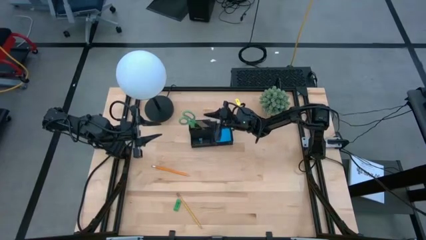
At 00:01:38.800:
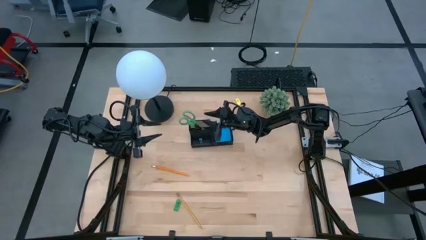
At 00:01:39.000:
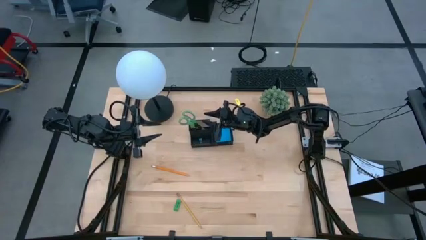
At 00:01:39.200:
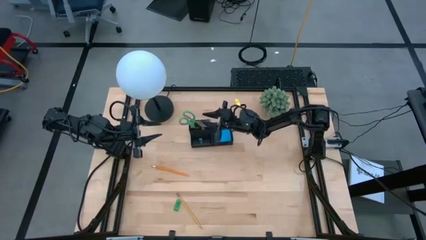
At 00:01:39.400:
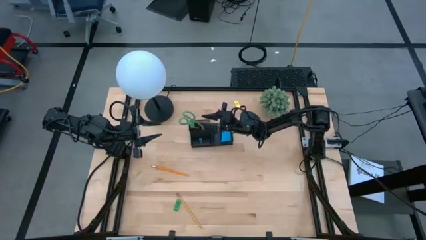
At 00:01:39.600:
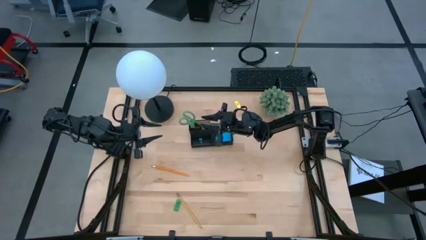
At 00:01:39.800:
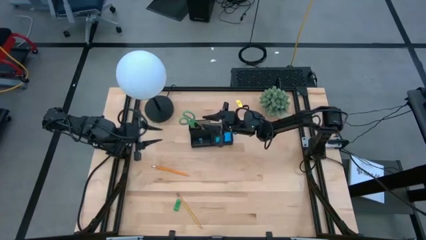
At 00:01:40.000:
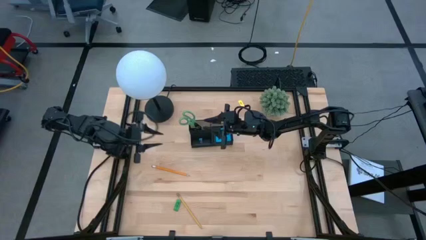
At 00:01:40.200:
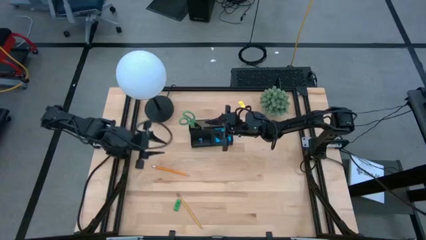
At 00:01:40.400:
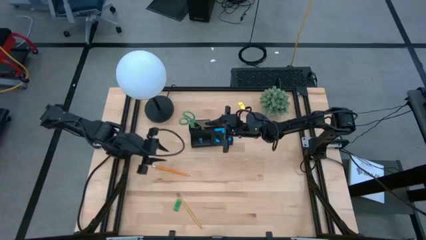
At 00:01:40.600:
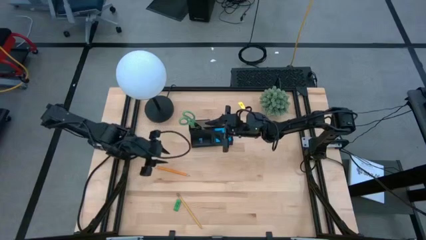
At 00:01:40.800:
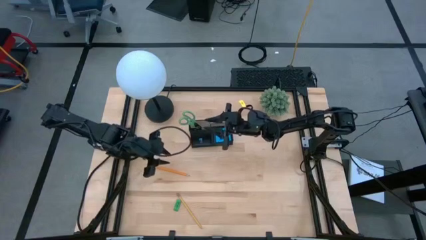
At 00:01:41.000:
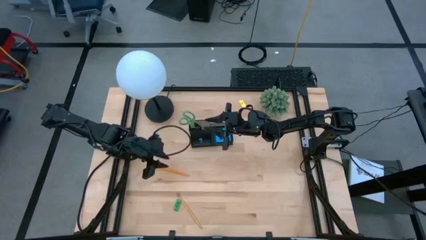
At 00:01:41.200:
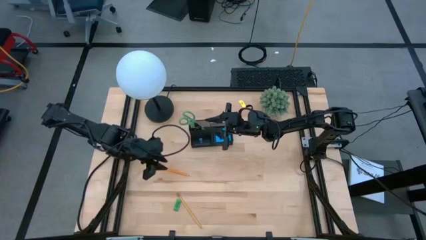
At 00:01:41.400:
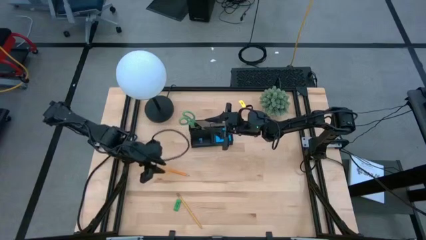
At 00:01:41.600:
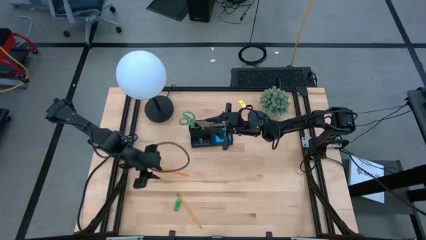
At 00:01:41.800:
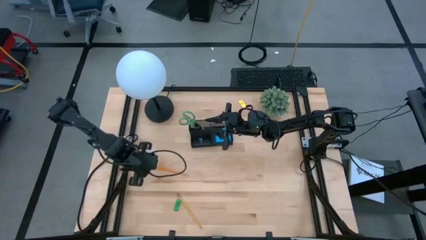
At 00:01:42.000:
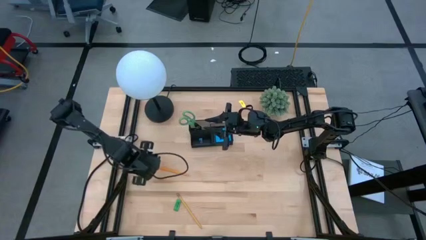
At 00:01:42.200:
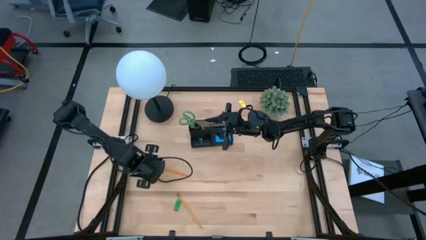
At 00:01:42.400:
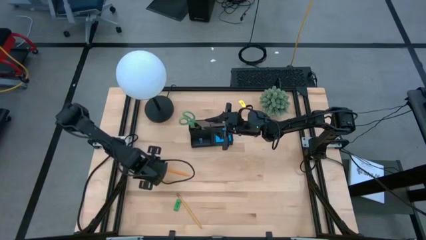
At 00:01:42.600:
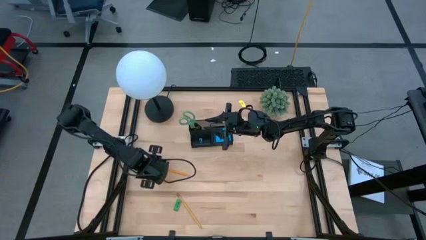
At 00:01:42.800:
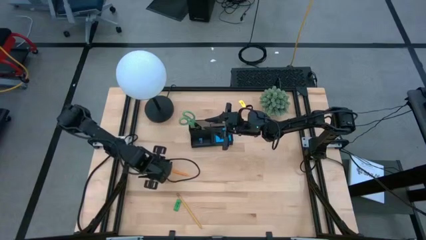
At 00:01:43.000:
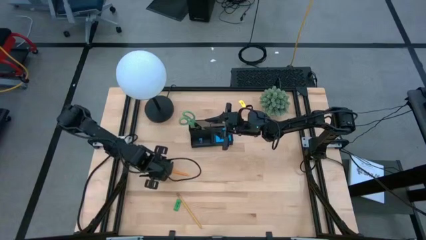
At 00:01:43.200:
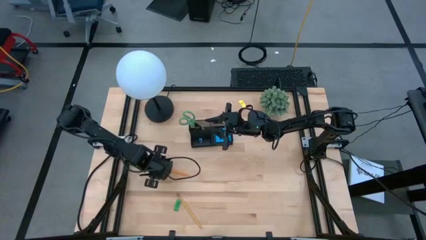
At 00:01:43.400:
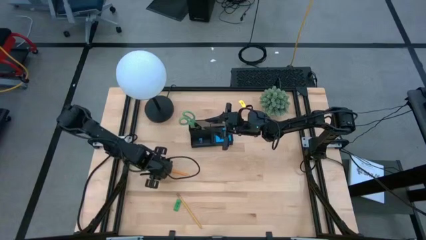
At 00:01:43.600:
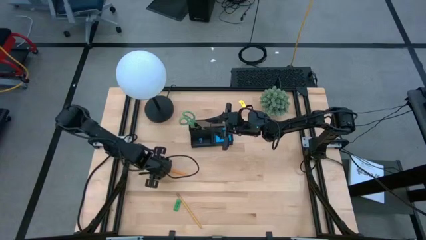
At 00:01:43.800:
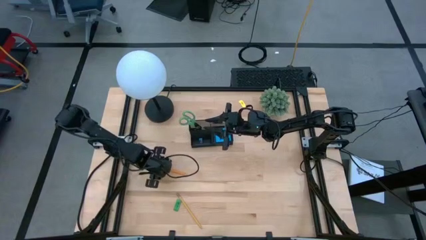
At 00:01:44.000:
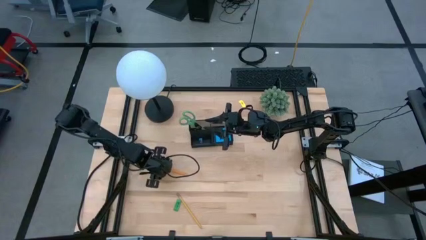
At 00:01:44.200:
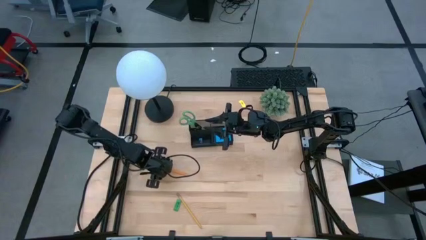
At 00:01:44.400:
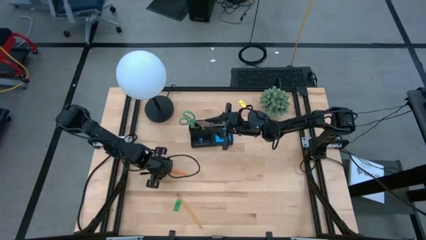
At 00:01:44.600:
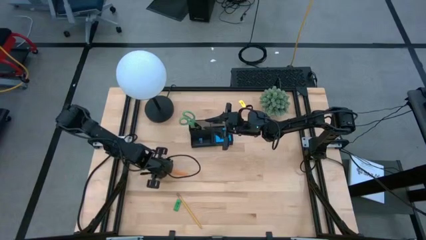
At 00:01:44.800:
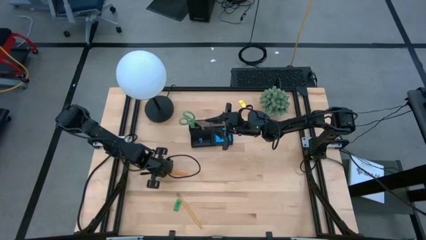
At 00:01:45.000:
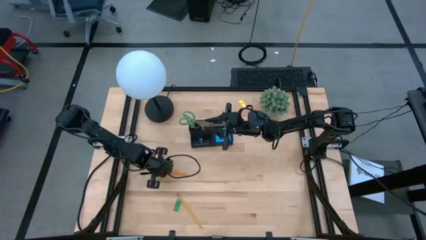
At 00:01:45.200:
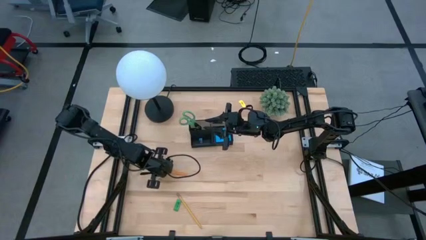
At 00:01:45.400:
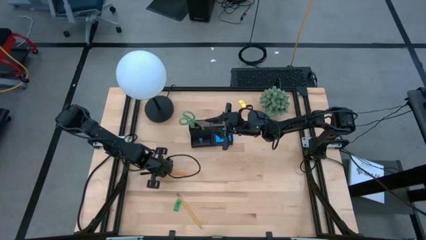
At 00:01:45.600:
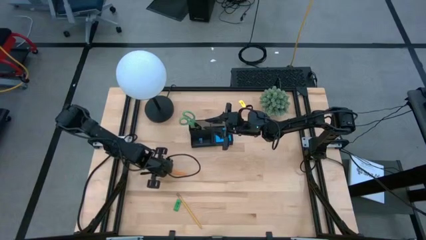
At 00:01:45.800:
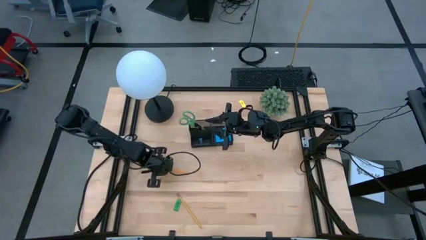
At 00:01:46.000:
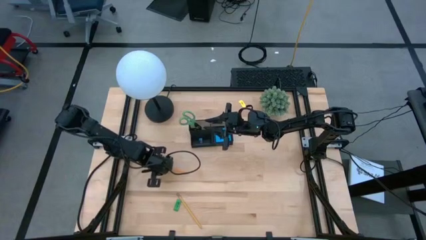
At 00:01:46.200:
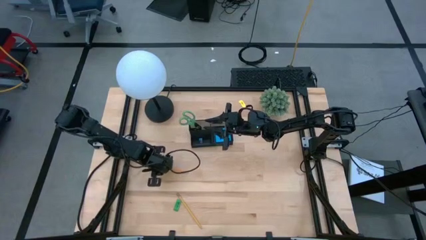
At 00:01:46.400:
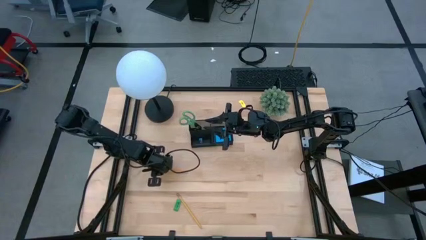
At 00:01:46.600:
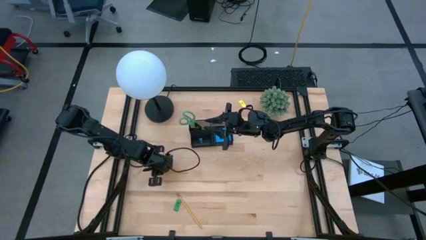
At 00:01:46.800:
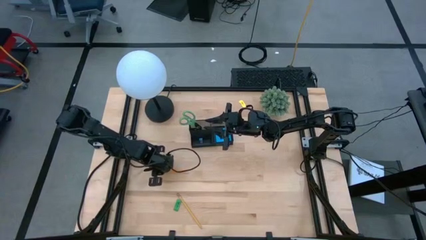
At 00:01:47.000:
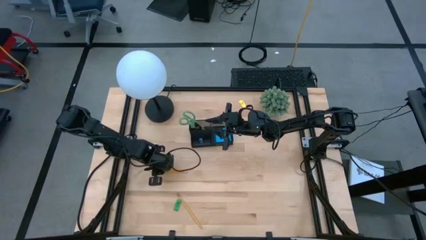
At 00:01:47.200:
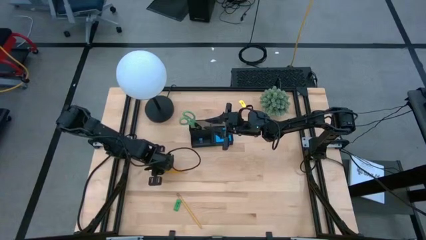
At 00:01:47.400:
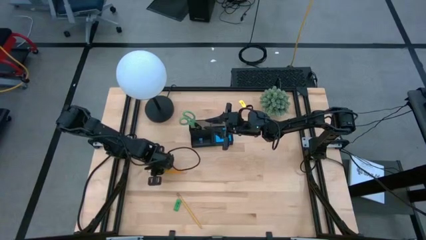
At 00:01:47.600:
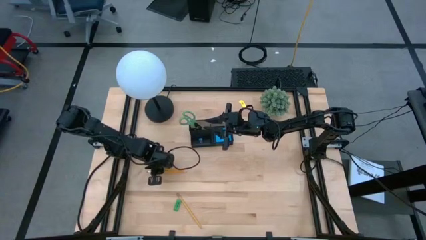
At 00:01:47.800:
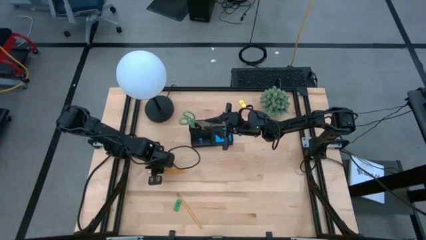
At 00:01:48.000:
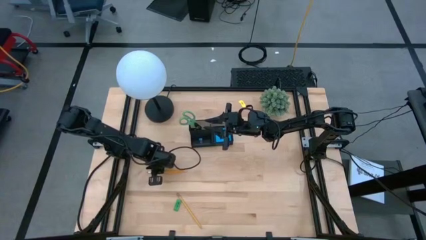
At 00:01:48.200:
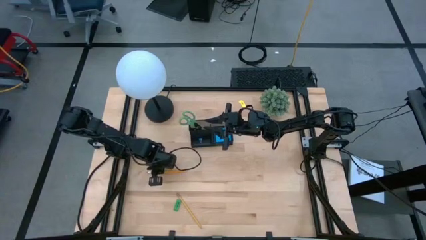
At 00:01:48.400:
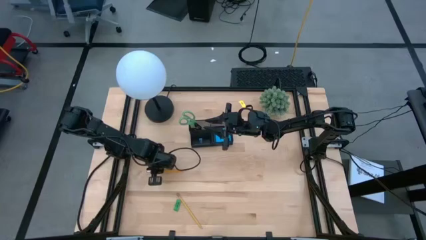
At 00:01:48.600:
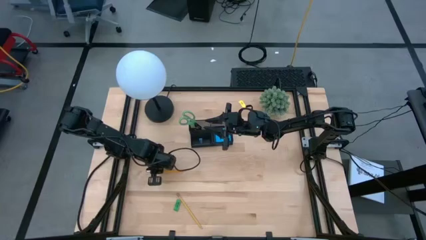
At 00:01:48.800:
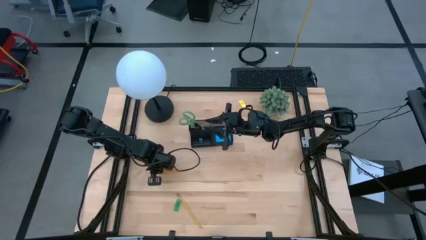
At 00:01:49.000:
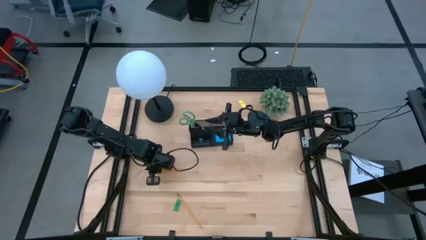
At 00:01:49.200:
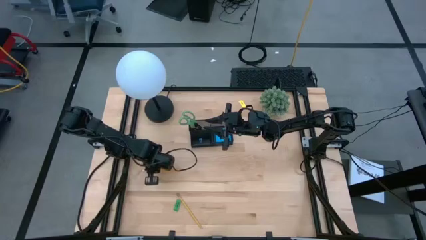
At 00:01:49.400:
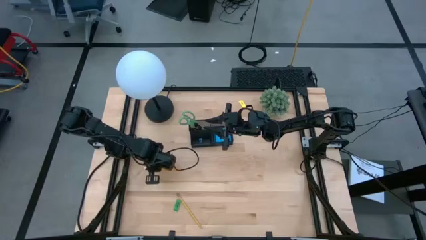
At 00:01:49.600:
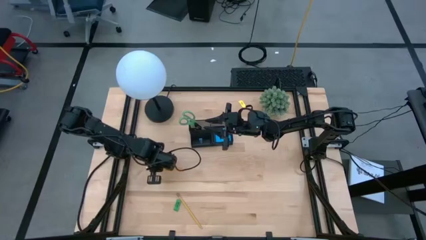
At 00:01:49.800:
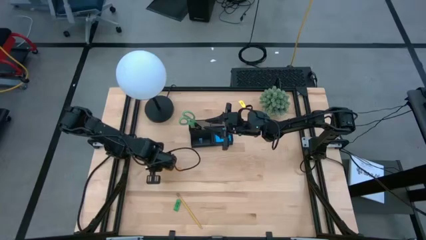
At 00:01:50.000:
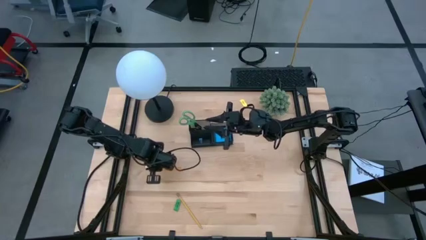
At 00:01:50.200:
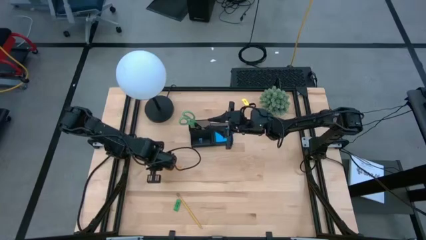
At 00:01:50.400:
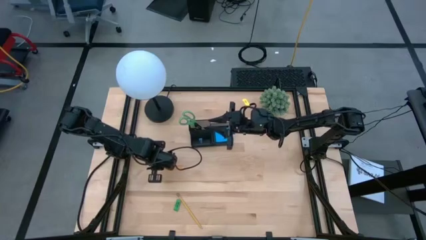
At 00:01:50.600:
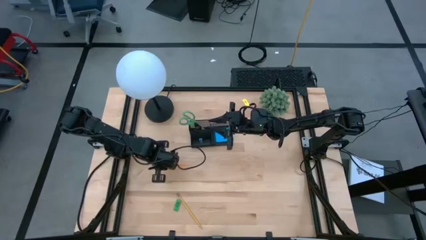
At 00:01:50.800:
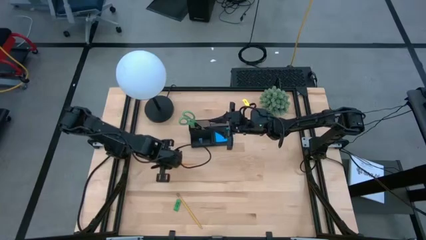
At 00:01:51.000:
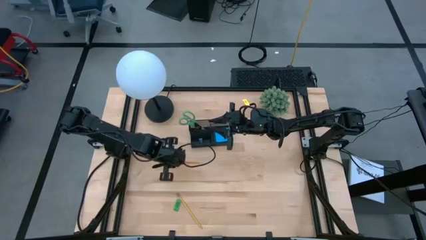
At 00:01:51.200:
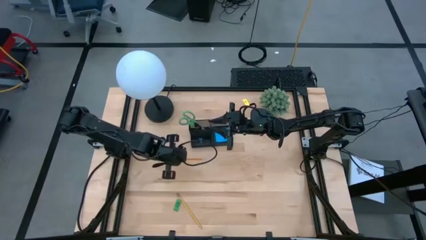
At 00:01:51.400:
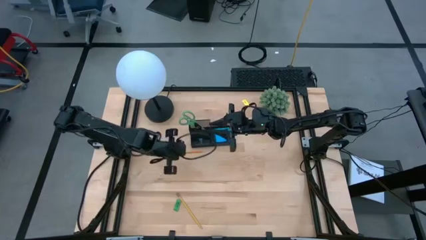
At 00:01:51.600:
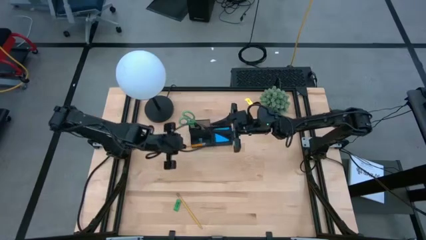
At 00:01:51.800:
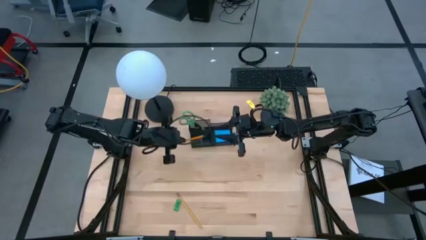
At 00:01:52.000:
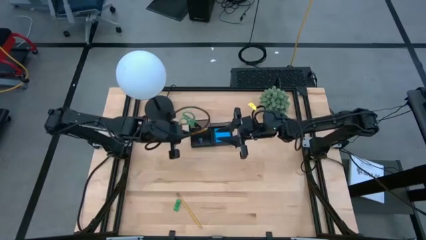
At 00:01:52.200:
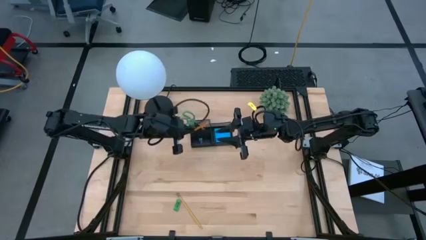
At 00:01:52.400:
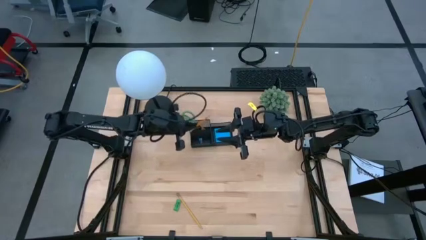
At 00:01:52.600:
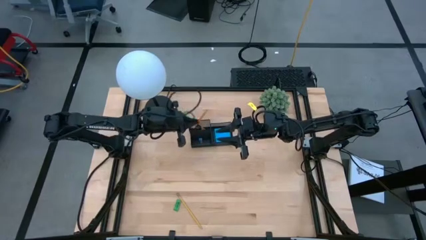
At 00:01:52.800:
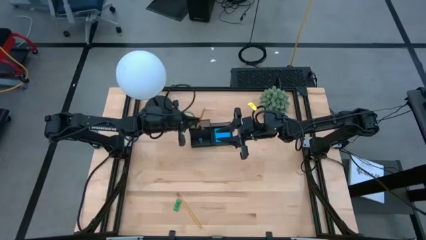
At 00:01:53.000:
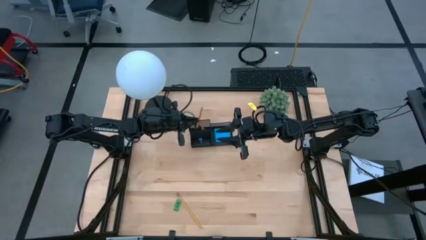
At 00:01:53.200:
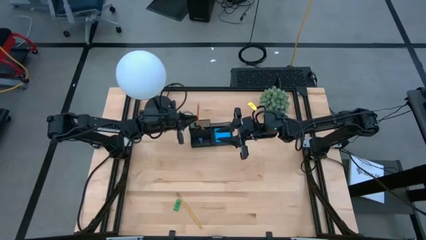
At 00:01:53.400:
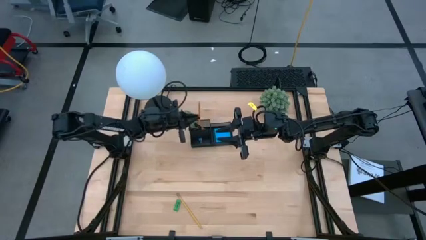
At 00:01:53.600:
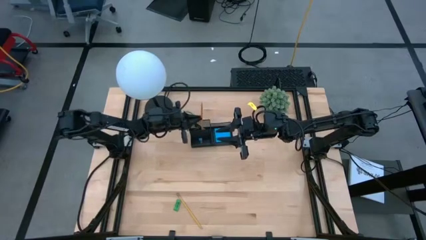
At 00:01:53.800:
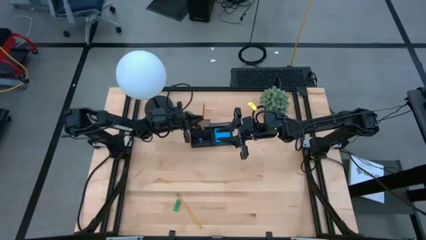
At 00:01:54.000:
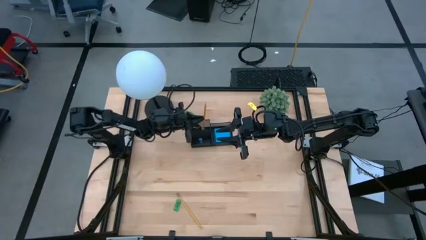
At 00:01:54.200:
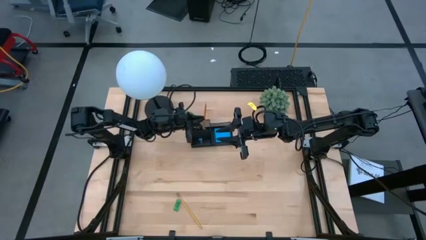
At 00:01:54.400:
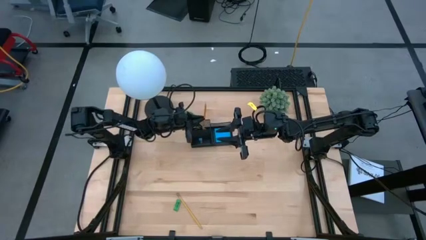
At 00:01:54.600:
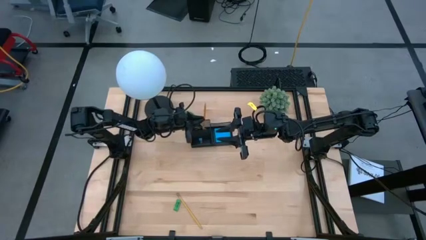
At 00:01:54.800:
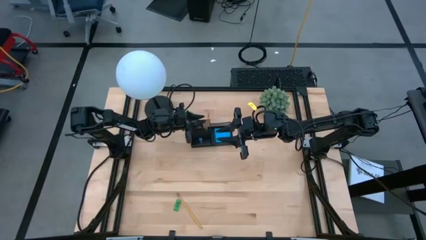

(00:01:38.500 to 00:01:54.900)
Task: Pick and place office supplies into organizer
Put the orange pencil into the black desk organizer
